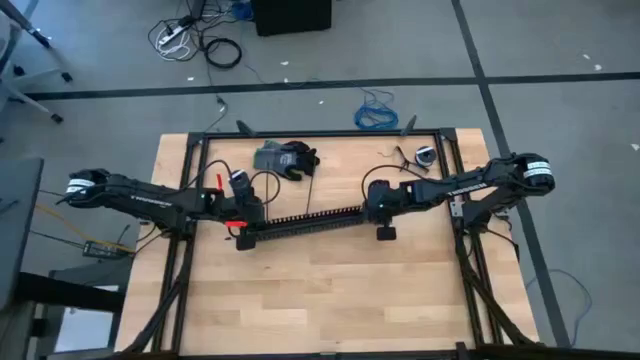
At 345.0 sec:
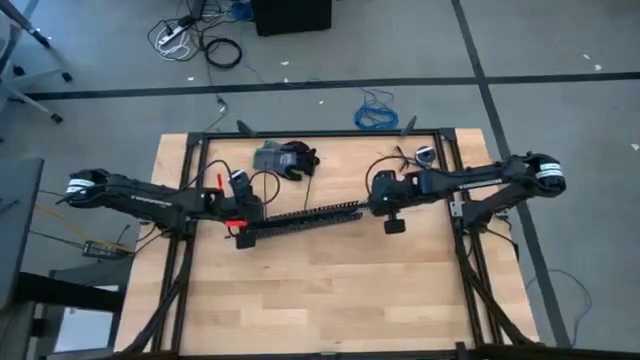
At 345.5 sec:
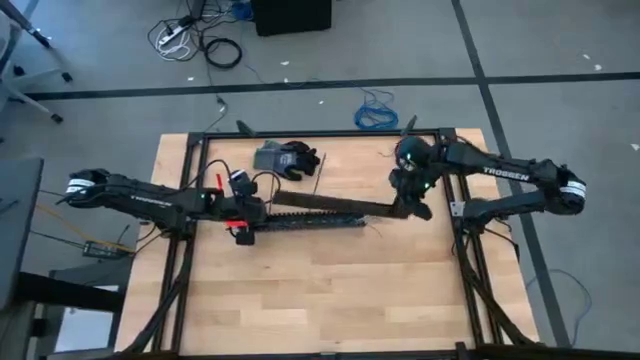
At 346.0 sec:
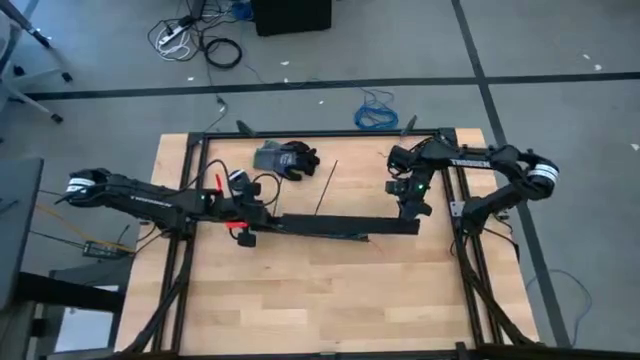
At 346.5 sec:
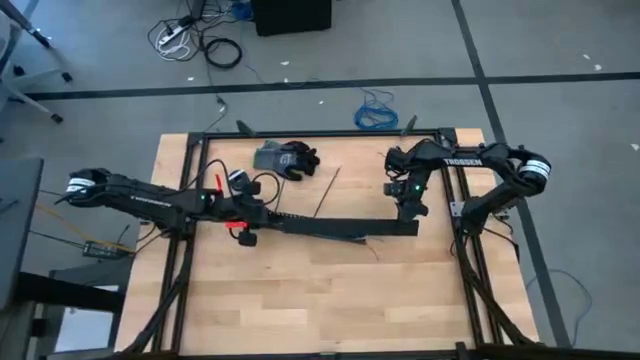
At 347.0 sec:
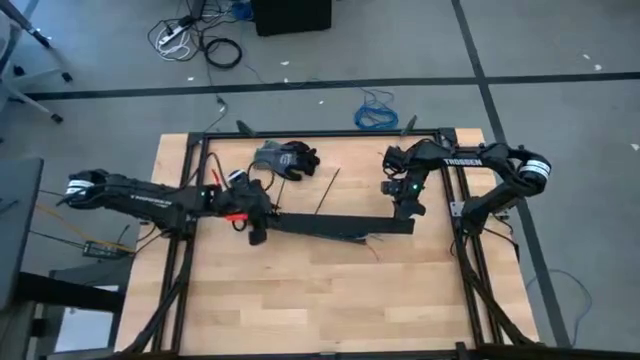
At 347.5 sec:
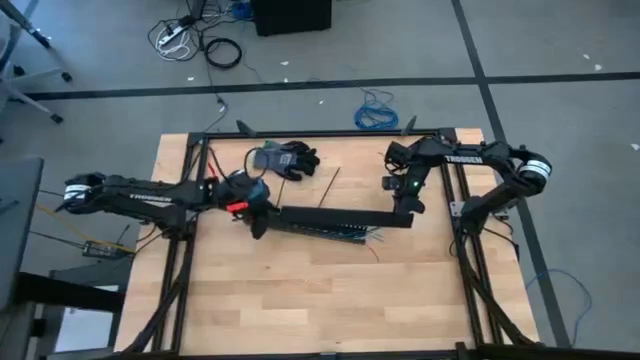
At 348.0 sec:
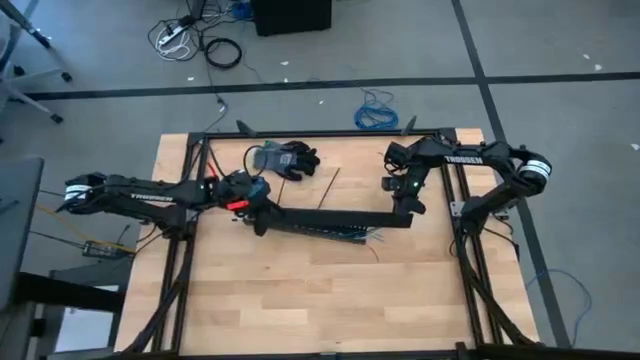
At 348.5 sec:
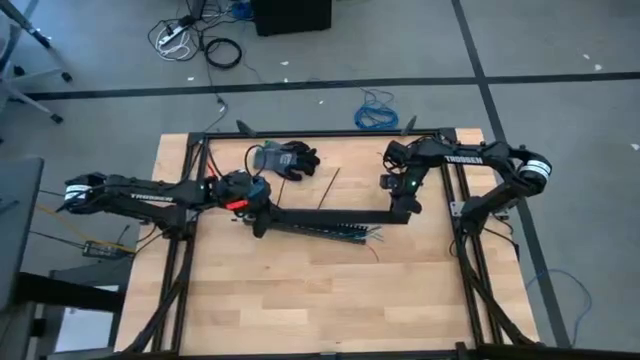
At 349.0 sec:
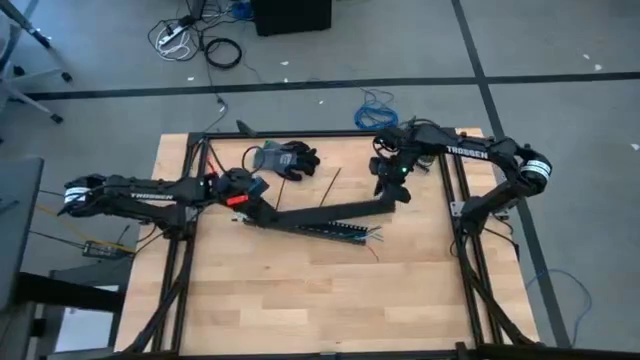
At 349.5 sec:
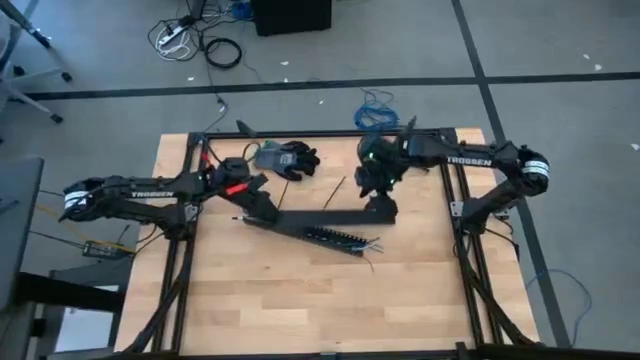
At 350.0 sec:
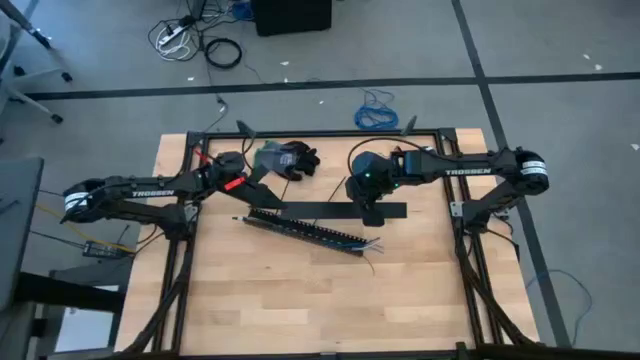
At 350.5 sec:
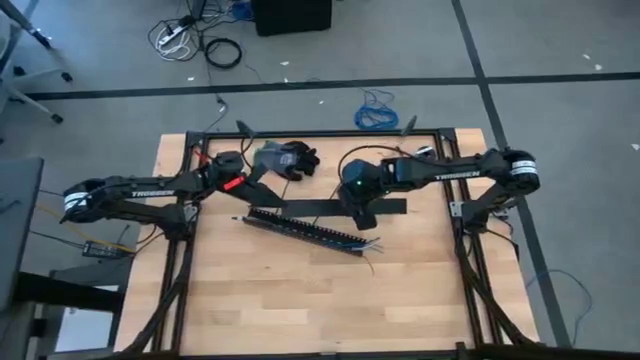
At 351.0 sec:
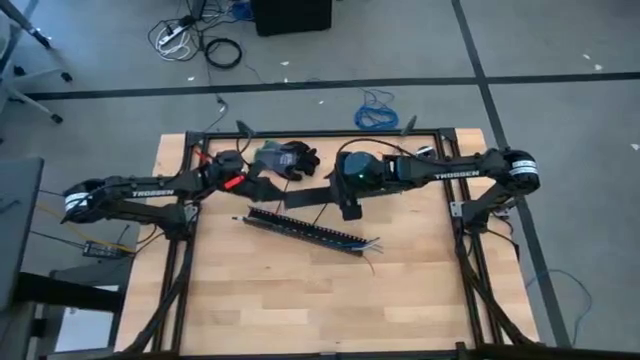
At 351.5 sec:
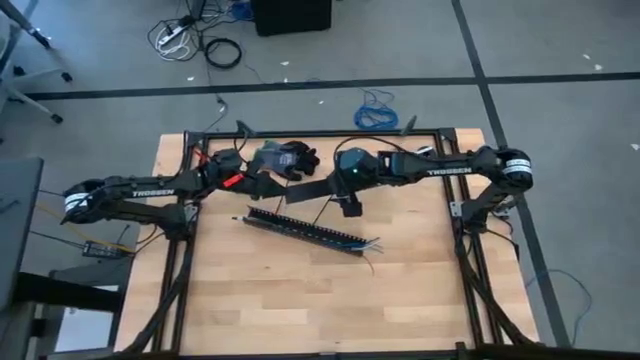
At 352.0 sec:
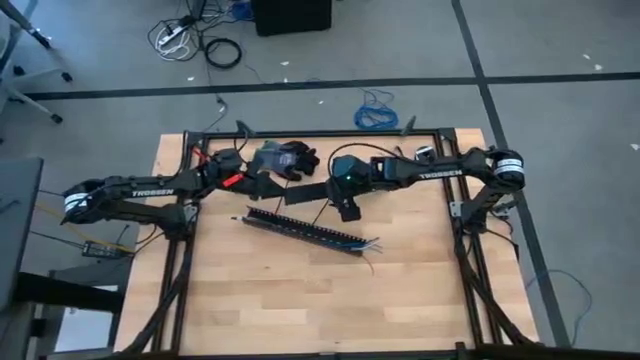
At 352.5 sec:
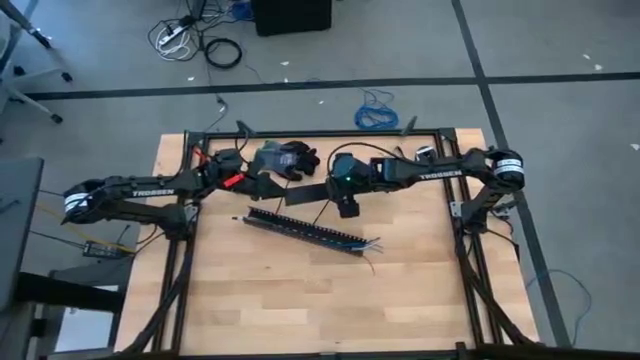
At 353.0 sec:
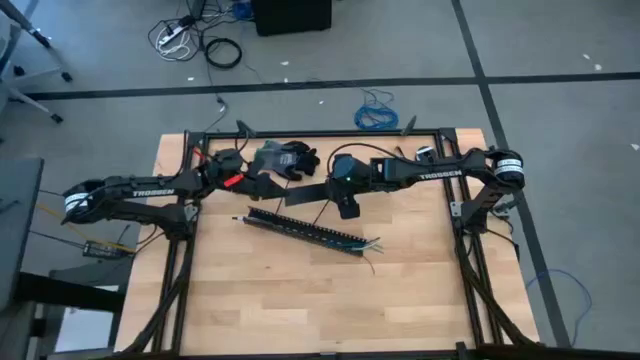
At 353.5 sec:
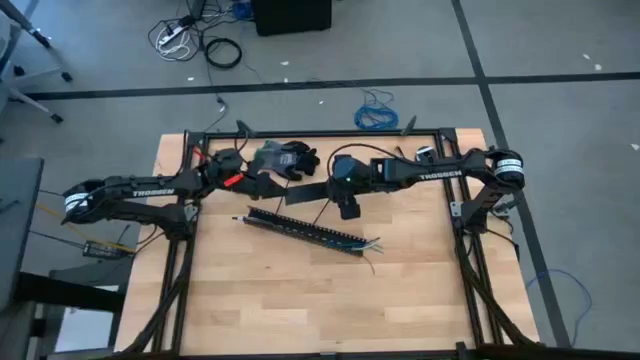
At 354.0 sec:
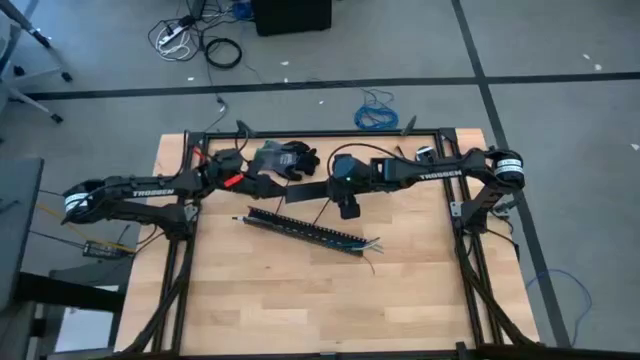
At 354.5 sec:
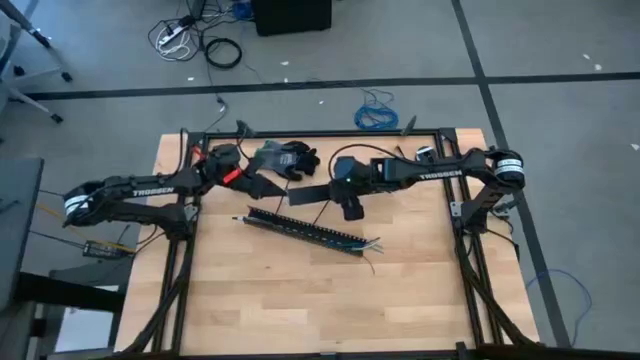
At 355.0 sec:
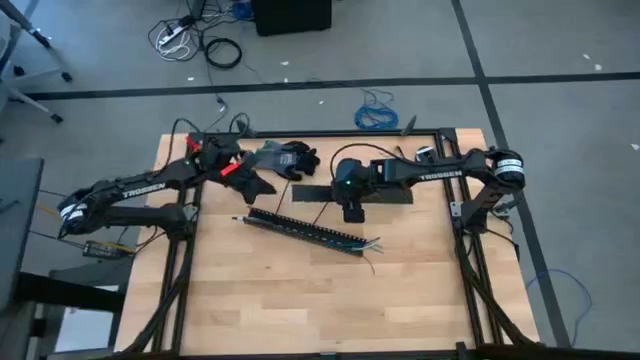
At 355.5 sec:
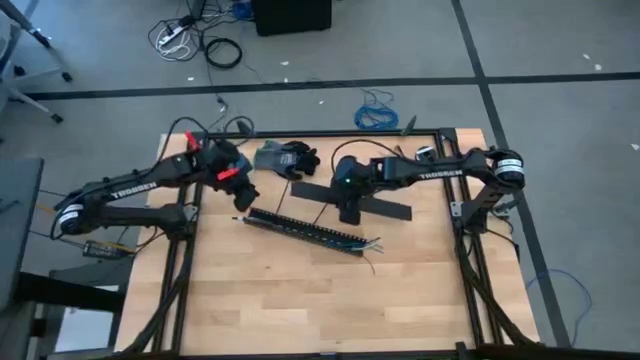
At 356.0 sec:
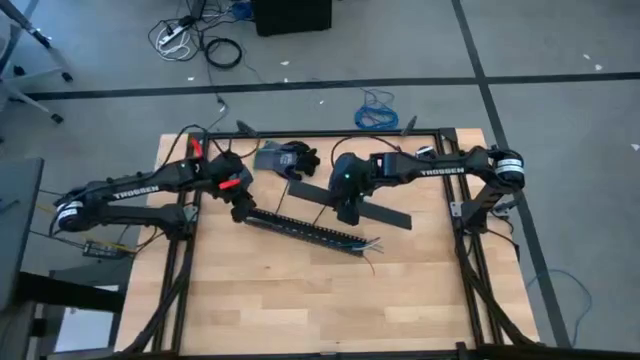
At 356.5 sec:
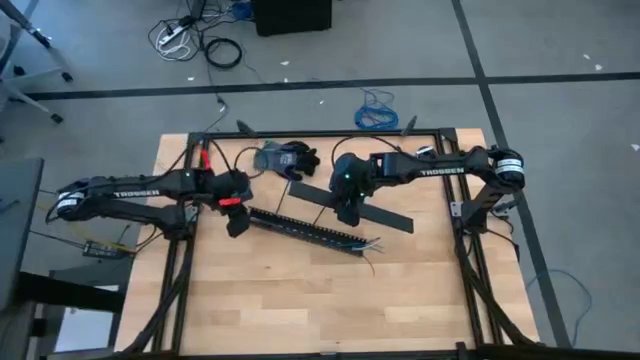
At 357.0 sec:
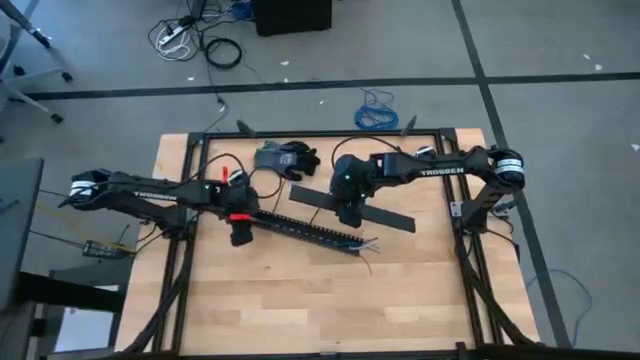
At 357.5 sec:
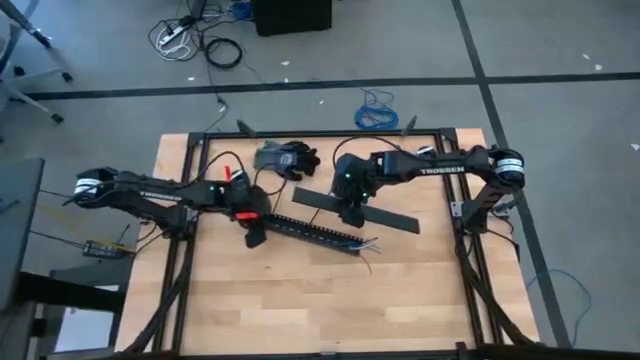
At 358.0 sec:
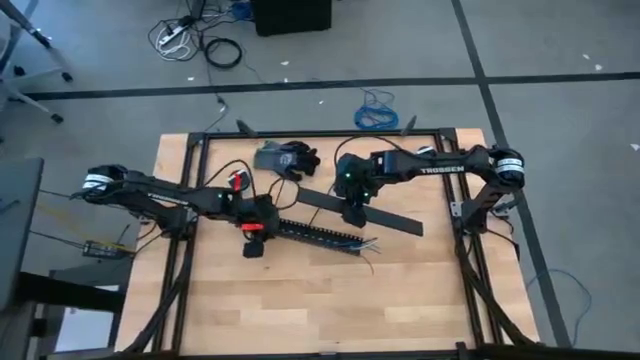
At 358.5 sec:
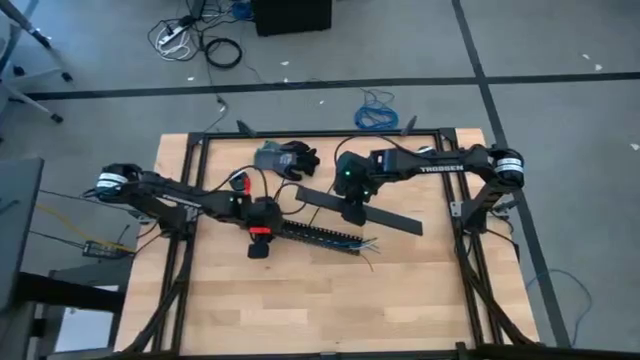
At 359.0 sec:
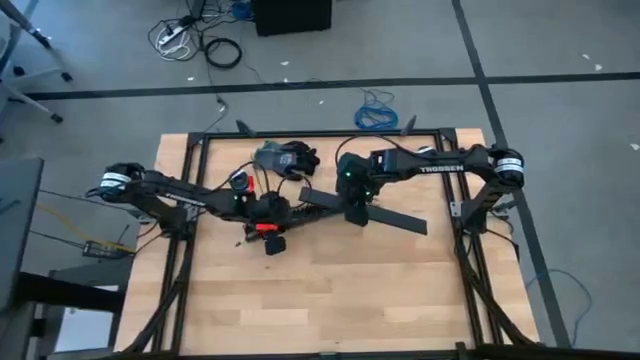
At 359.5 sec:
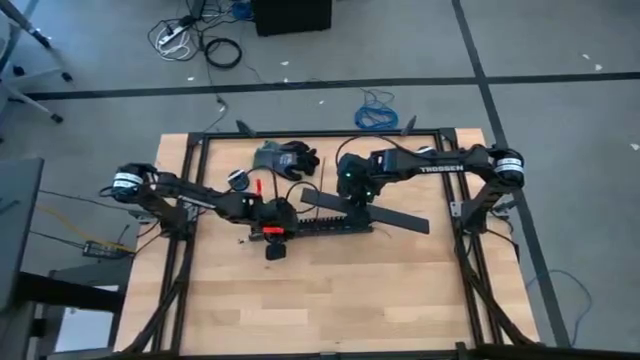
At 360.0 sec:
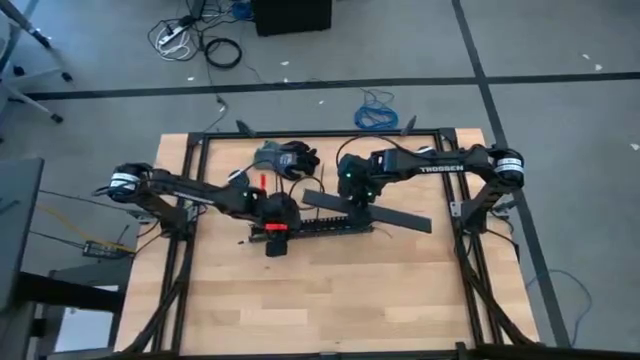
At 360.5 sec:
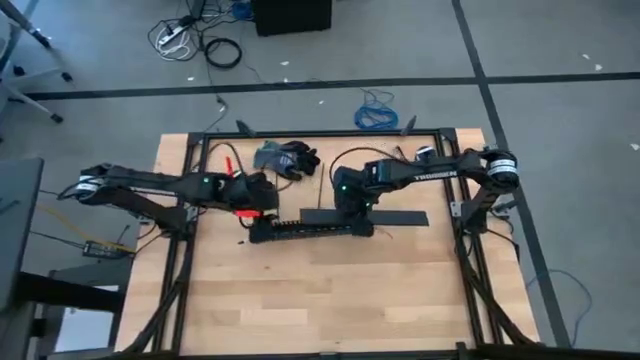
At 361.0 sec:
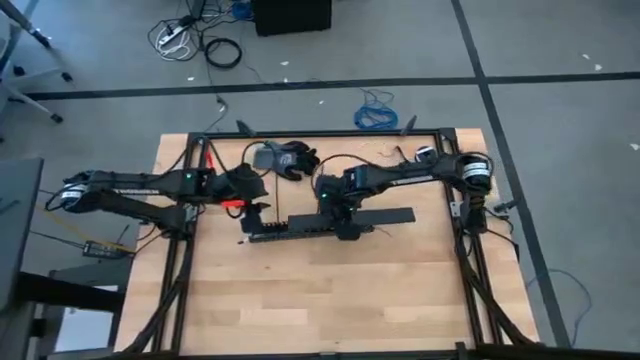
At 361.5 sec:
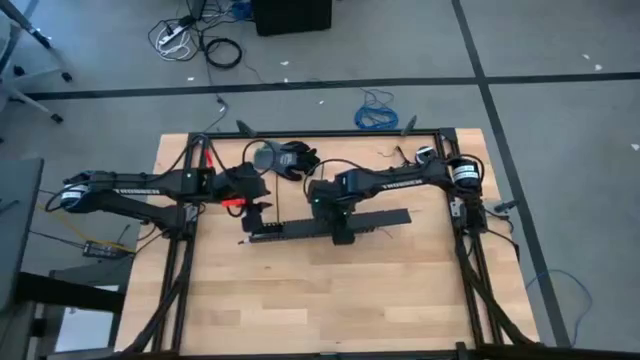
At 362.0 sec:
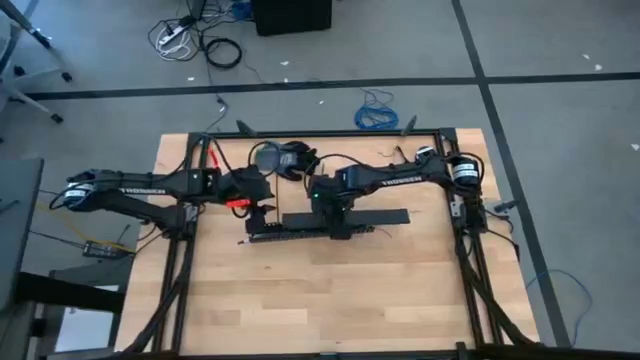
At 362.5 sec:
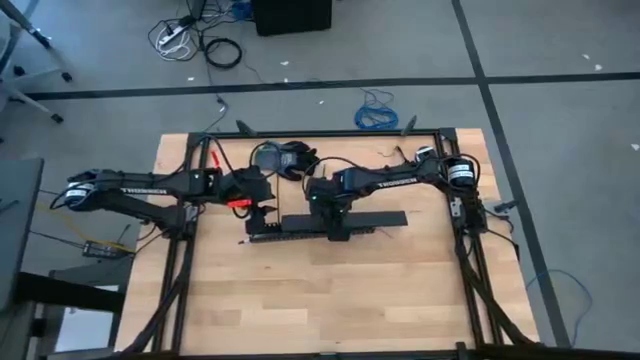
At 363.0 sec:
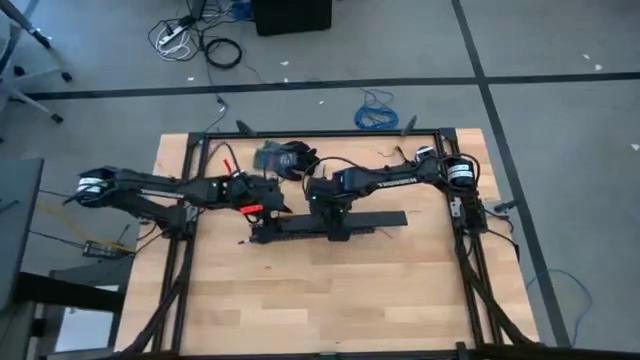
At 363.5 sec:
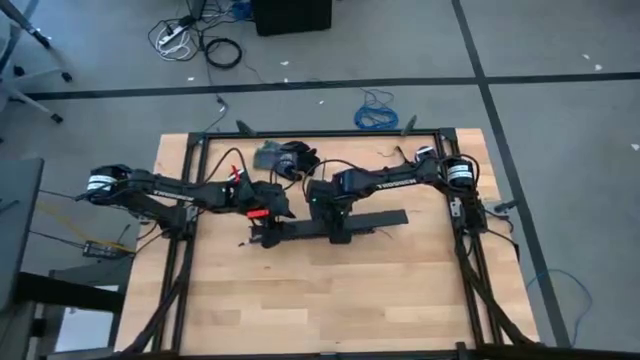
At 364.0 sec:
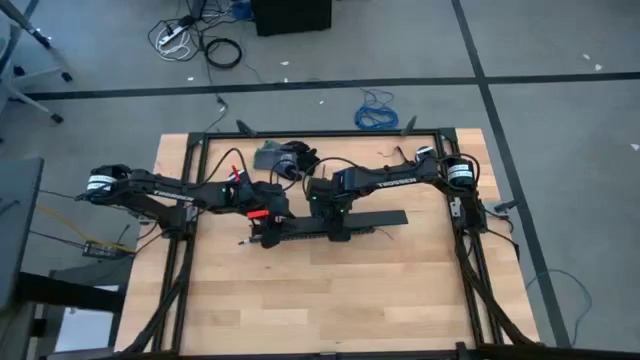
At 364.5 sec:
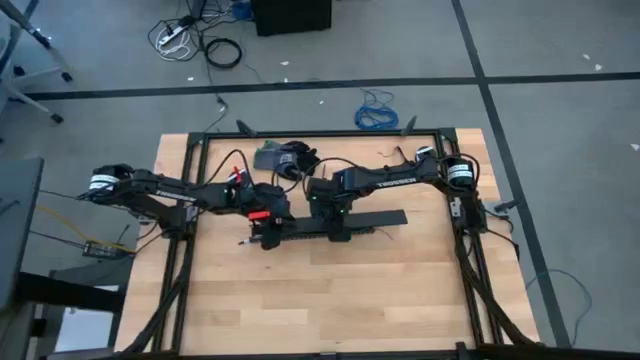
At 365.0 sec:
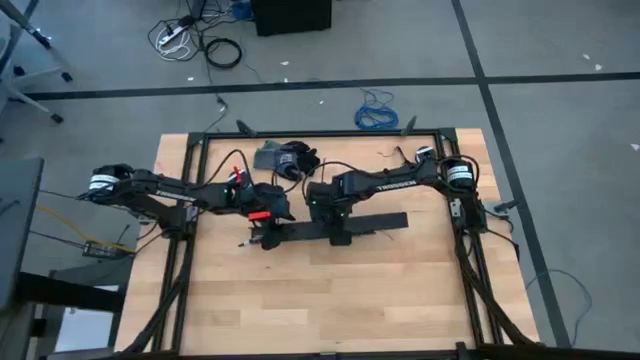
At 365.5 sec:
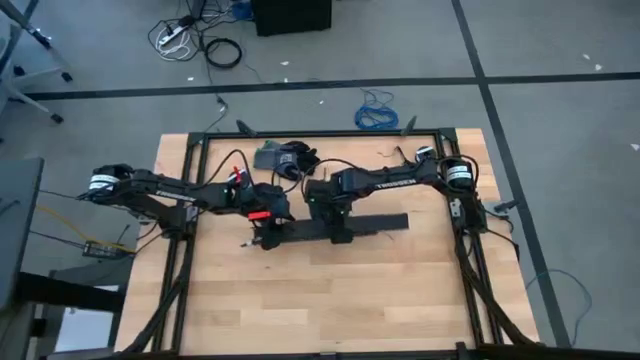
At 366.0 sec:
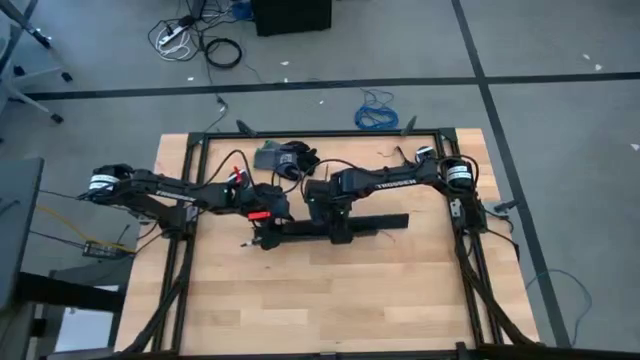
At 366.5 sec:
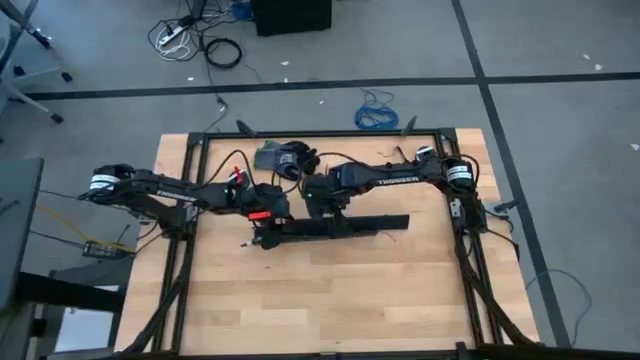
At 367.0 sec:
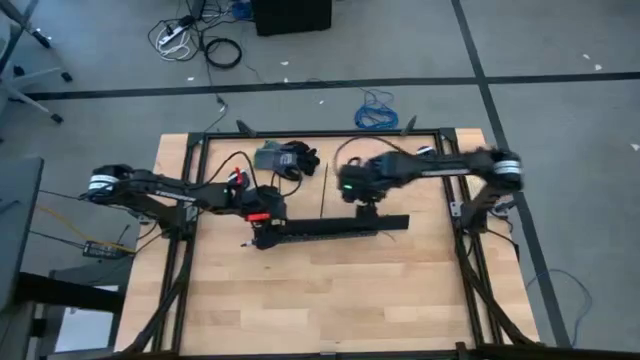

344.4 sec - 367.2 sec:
Task: Ziptie cables
Close the black cable duct cover
